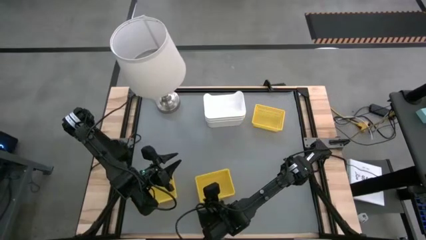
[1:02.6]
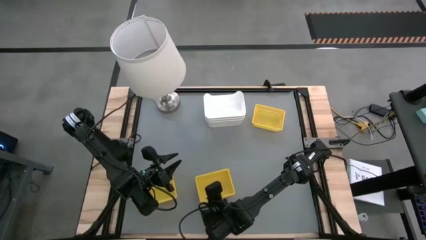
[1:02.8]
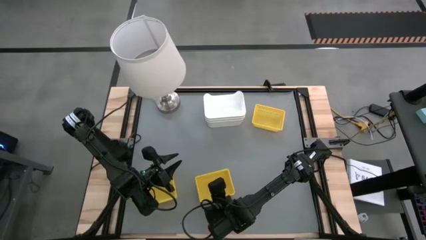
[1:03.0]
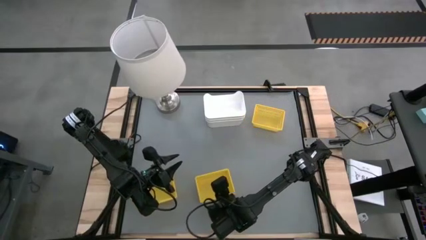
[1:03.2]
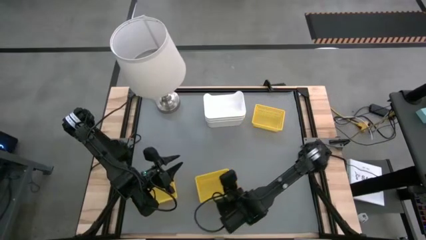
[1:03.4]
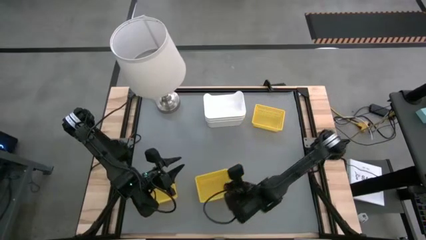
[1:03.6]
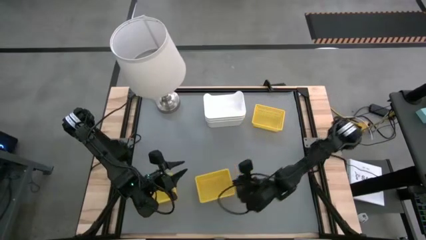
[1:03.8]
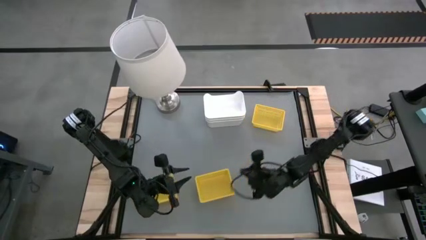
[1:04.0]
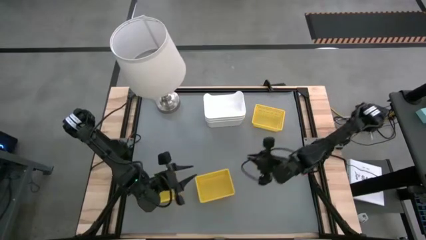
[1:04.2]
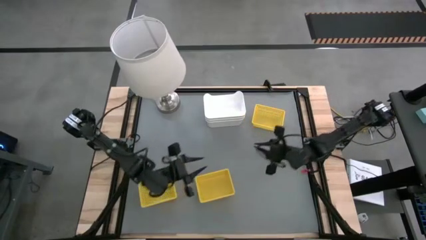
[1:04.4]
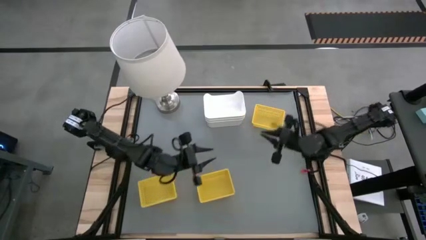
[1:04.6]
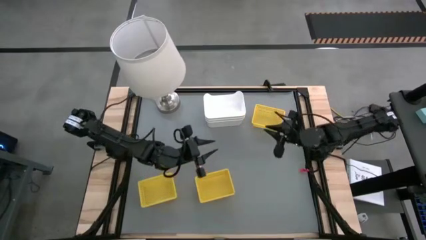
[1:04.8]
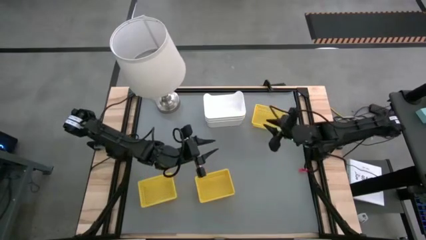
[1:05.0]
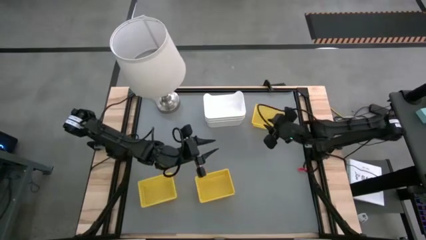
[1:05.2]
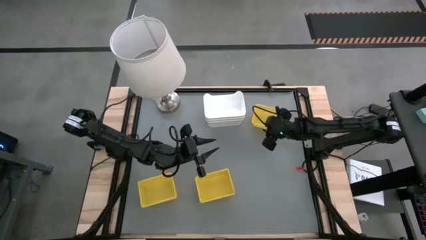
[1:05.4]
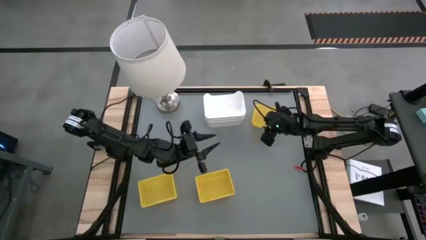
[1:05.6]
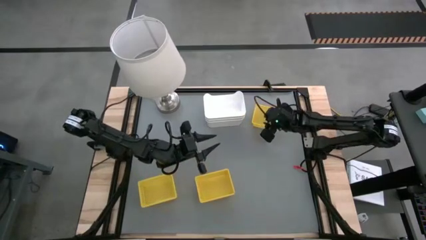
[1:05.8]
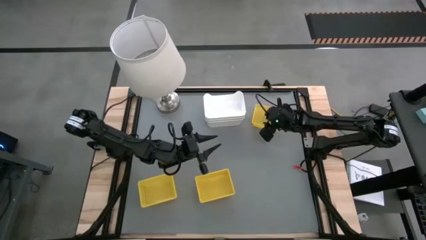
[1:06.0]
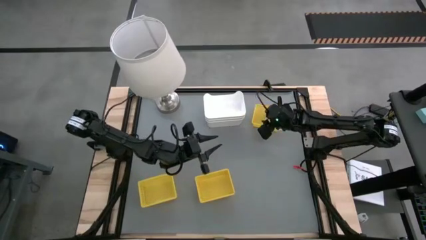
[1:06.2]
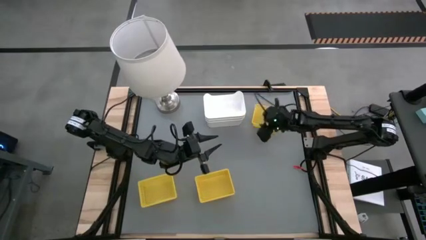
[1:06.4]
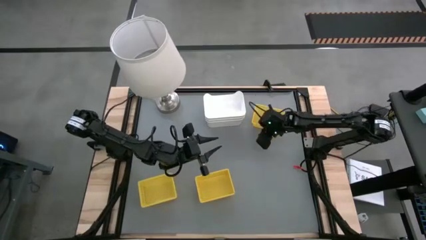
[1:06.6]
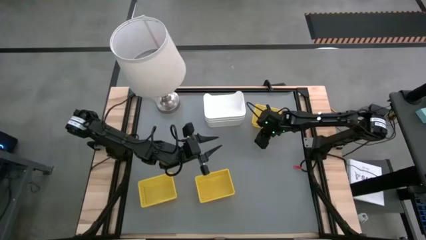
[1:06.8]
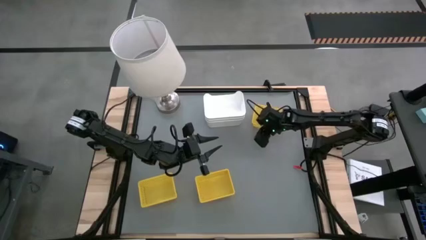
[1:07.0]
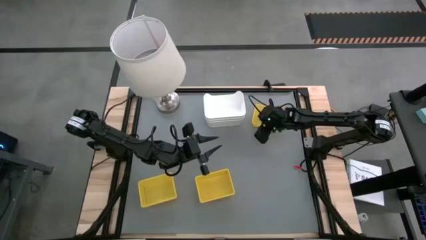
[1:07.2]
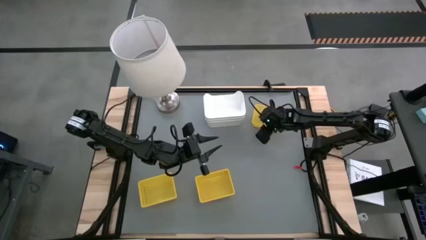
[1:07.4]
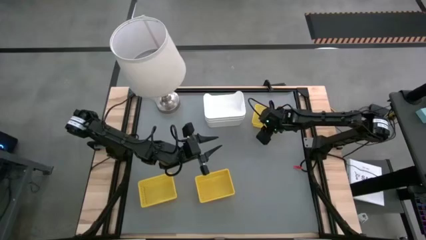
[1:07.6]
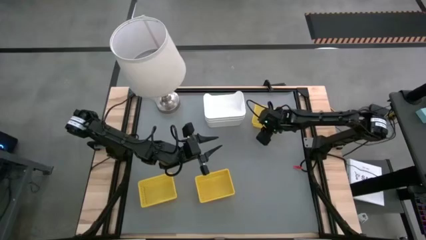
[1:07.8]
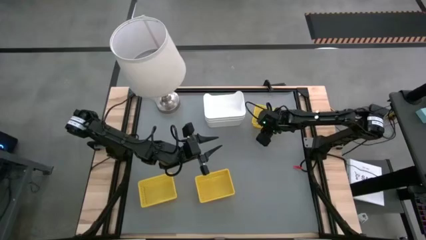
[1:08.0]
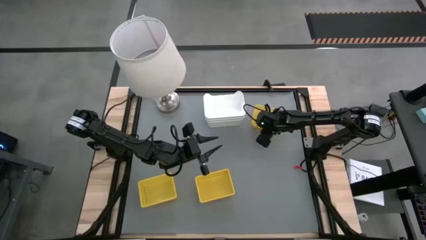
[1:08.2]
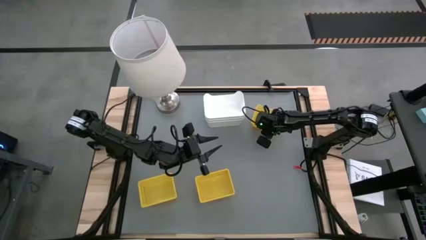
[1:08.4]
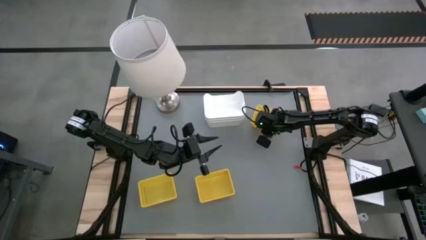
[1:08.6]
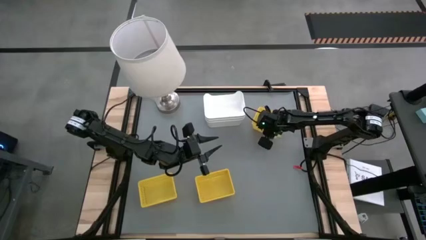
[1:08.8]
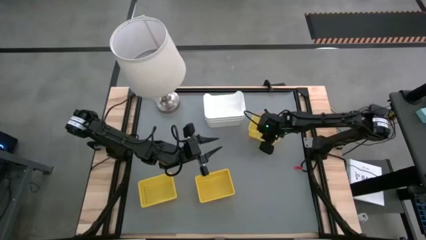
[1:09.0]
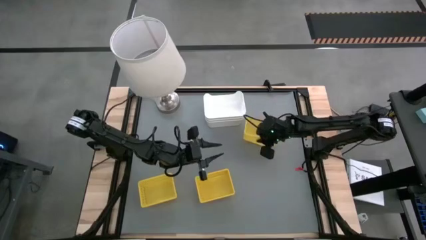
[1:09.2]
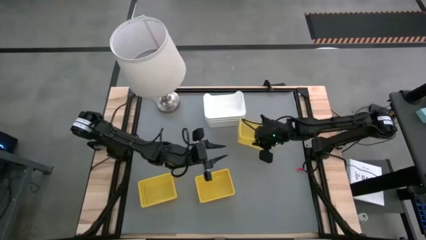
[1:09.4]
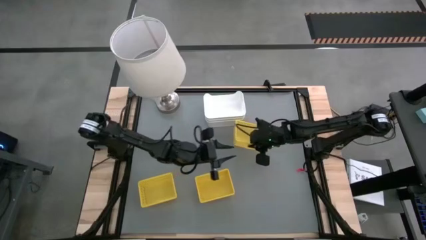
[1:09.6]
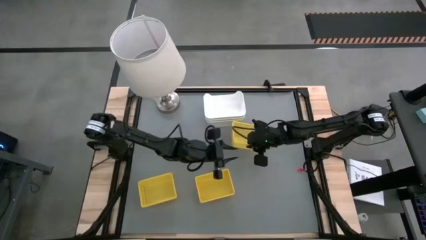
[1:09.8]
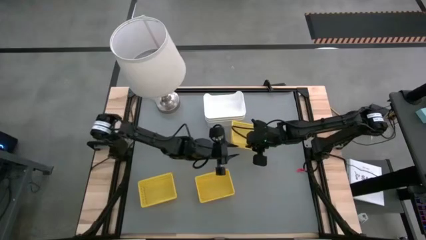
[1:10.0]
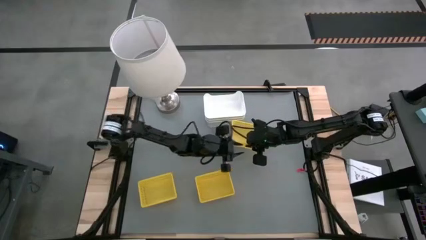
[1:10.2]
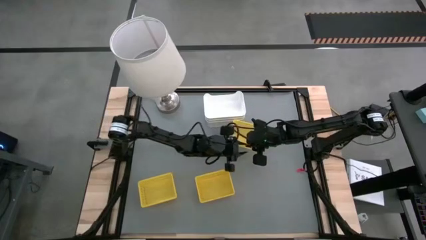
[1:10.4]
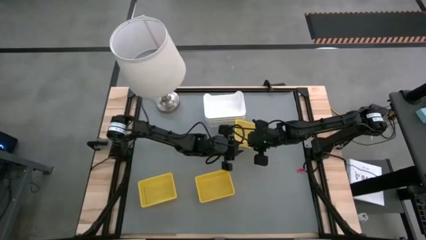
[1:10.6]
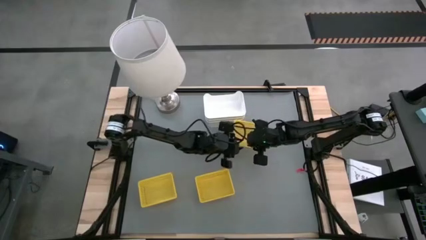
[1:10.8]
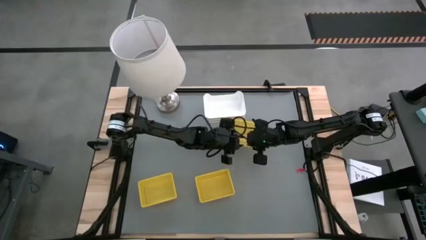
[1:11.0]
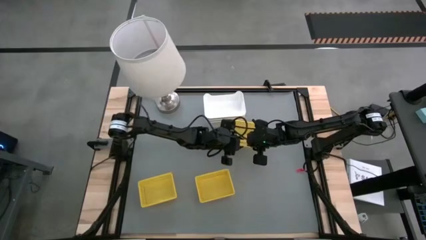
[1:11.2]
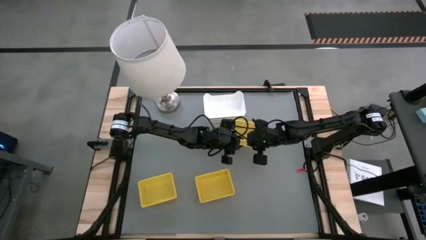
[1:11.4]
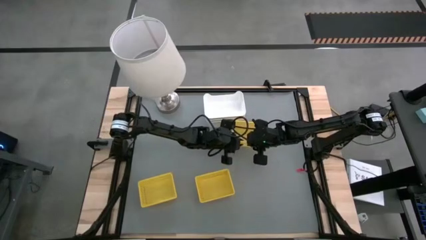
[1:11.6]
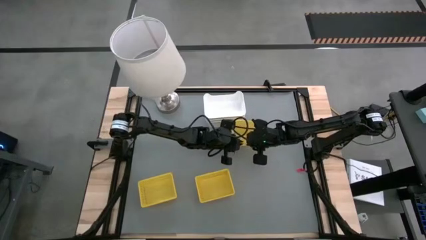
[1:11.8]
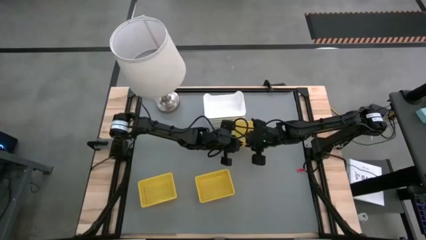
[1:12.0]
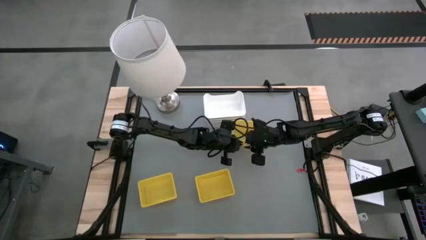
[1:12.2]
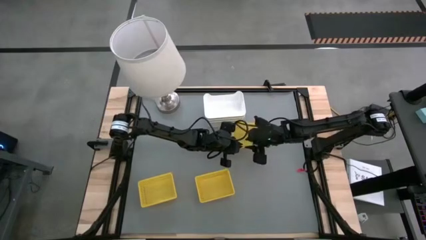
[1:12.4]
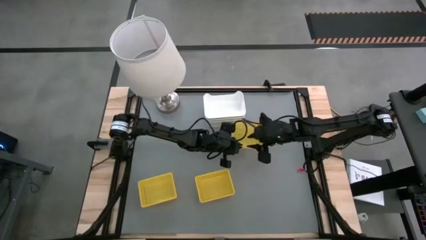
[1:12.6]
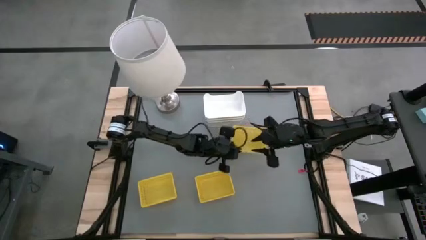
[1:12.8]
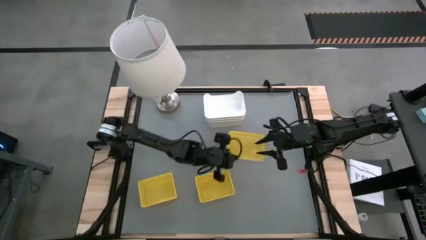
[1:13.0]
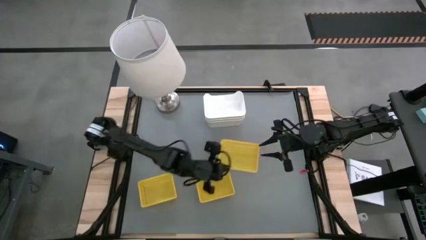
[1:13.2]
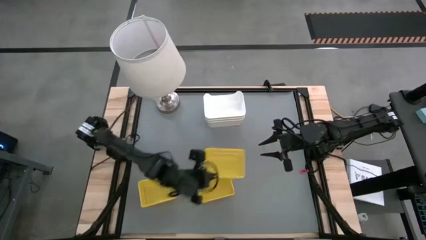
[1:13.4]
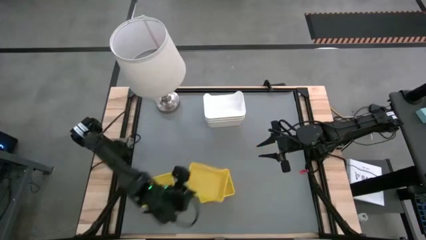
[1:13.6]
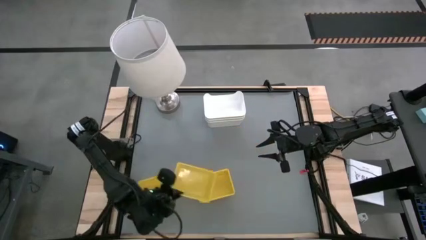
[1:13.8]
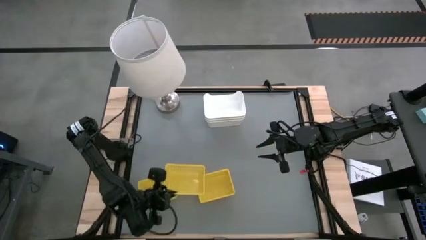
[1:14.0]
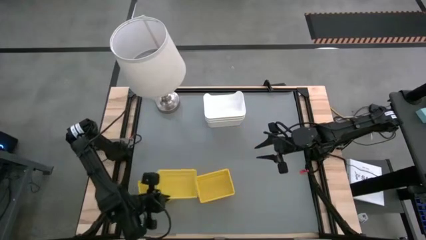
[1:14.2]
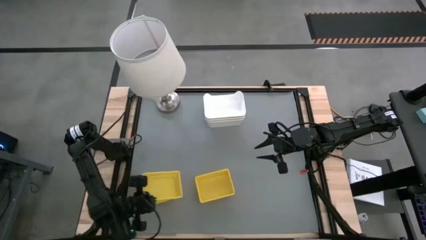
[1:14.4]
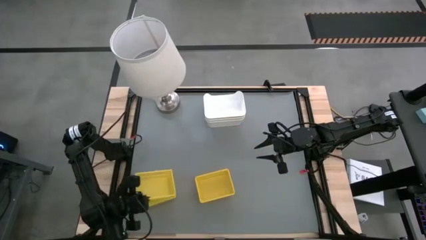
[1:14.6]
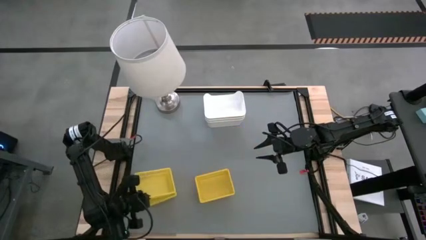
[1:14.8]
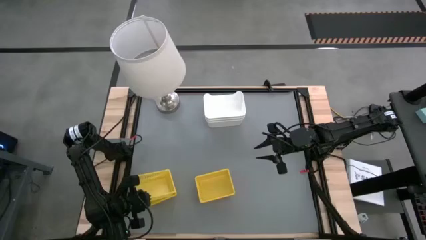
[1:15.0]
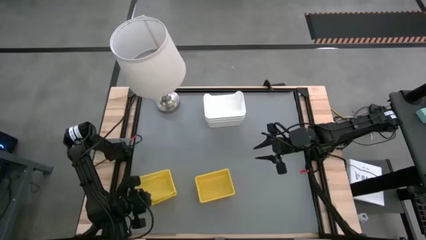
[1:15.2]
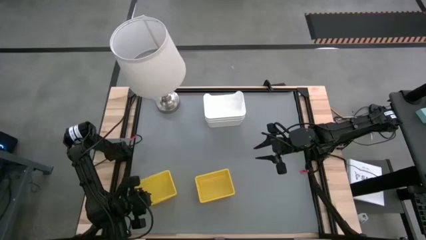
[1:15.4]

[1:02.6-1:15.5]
Stack the yellow basket on the stacked yellow baskets

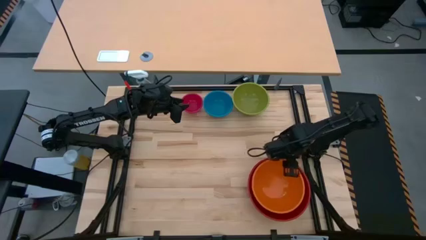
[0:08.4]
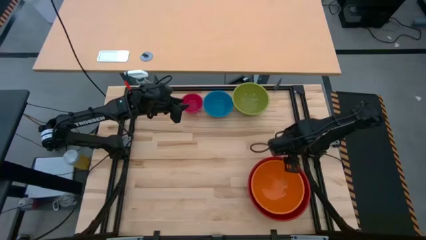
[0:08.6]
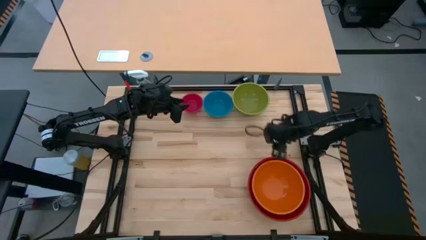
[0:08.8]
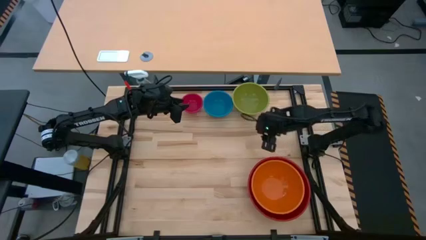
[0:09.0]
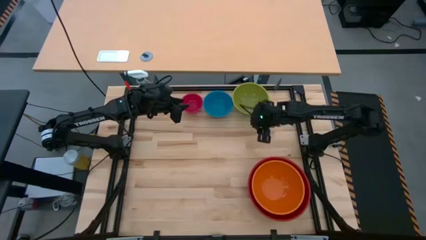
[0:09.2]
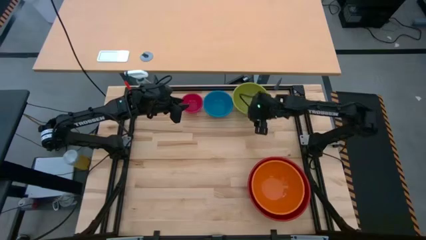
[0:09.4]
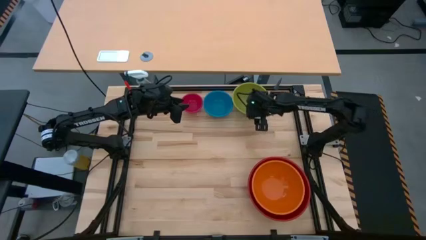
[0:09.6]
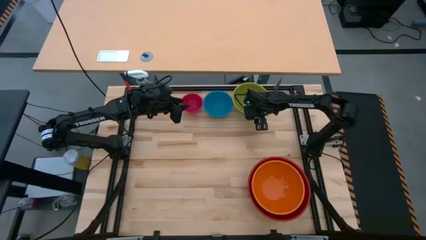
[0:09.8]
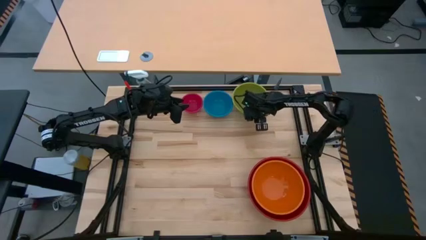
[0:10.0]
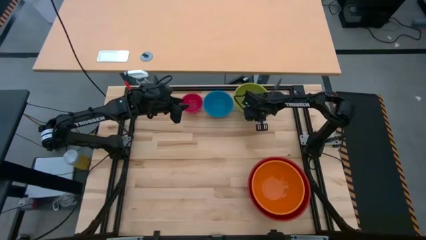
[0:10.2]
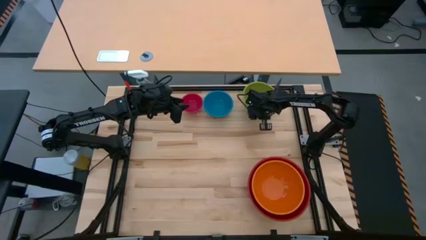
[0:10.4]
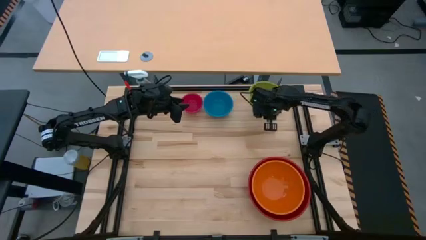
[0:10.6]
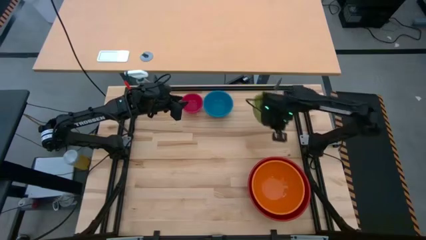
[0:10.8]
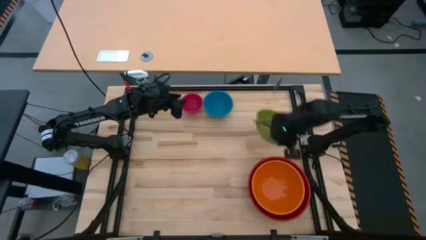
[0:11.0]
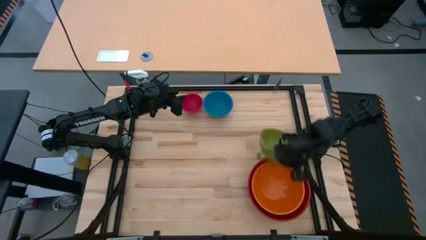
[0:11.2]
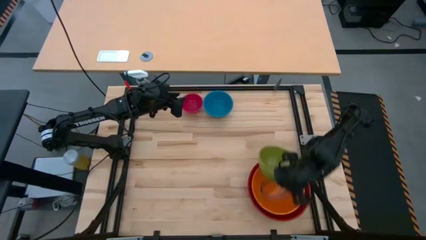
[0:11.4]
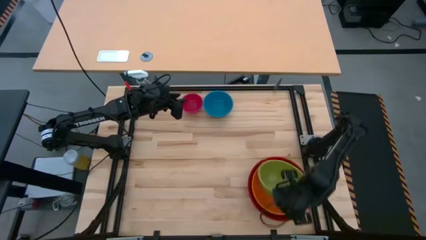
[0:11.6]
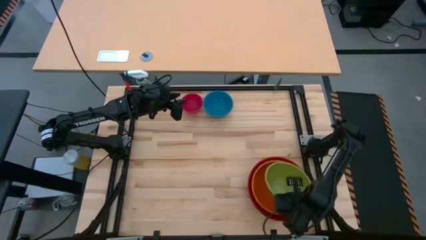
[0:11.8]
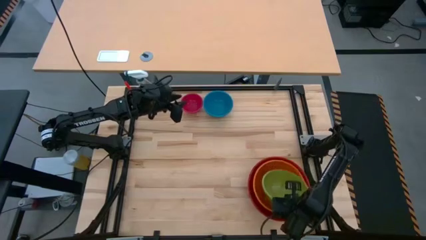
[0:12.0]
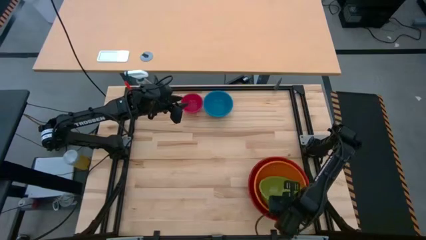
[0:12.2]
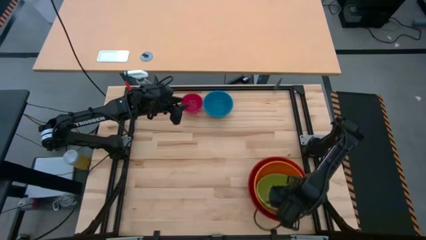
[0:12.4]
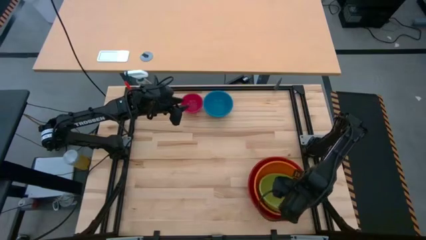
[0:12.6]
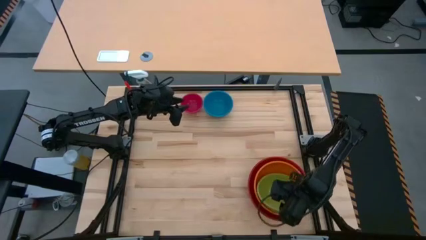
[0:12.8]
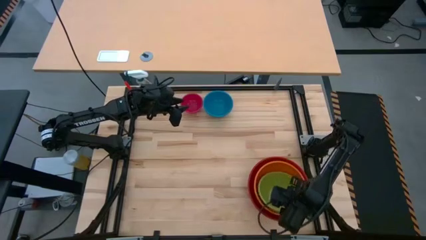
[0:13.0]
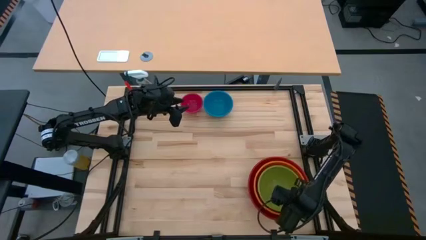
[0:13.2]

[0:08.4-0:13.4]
Stack the green bowl on top of the orange bowl
